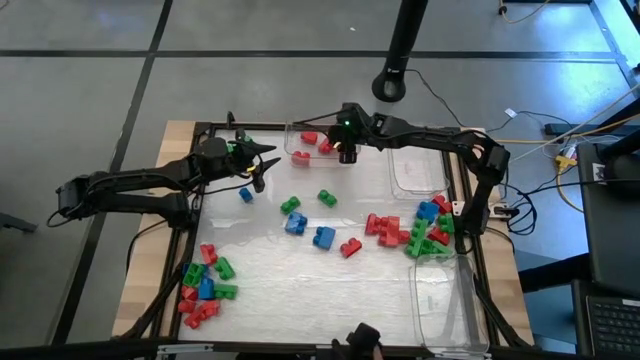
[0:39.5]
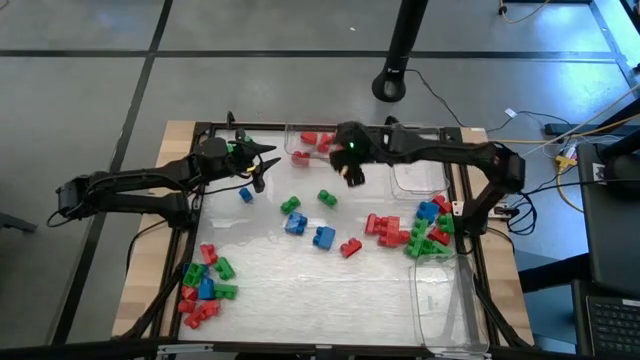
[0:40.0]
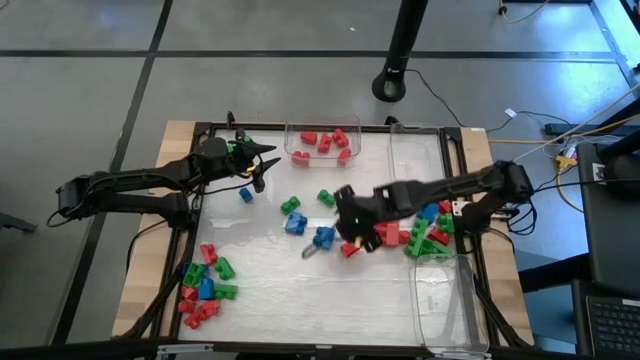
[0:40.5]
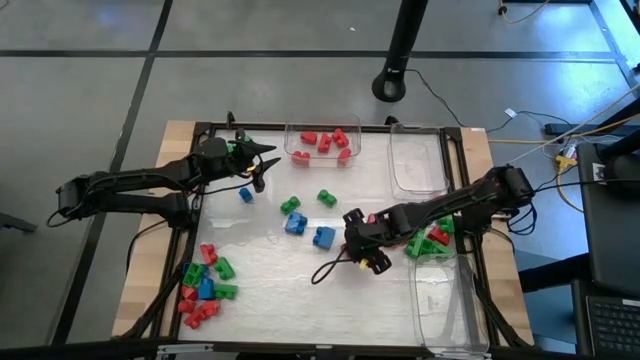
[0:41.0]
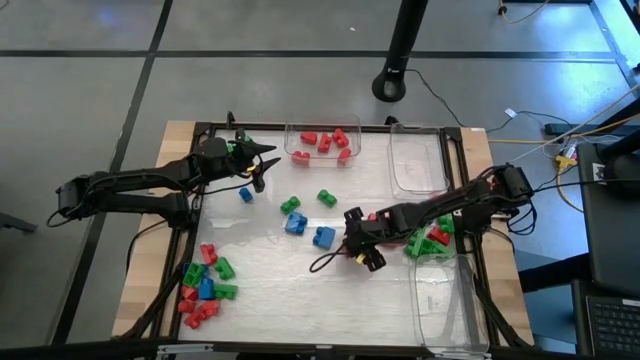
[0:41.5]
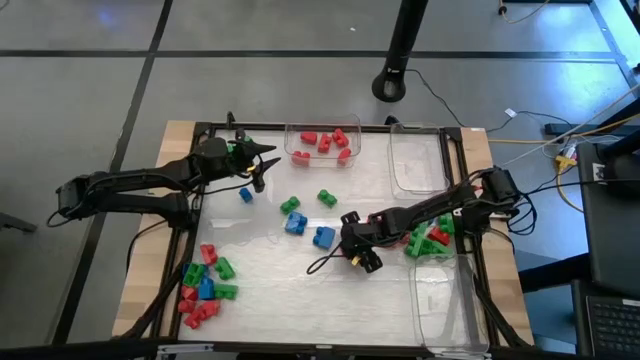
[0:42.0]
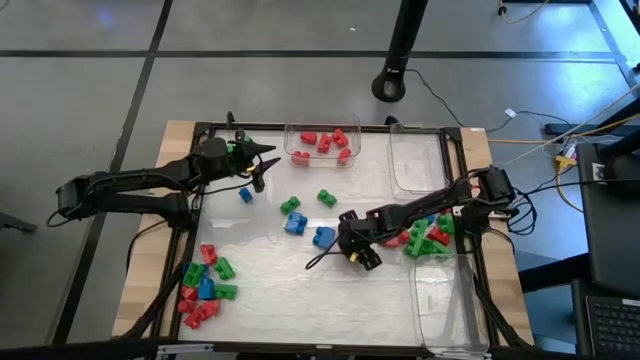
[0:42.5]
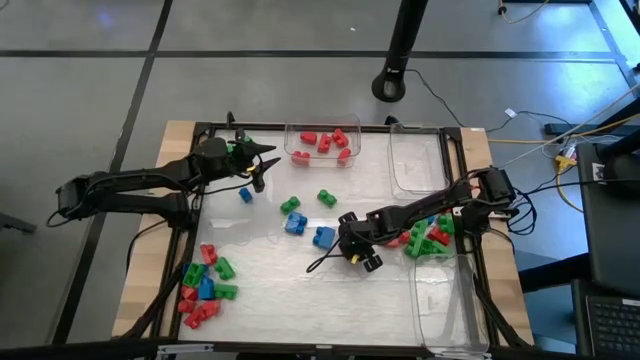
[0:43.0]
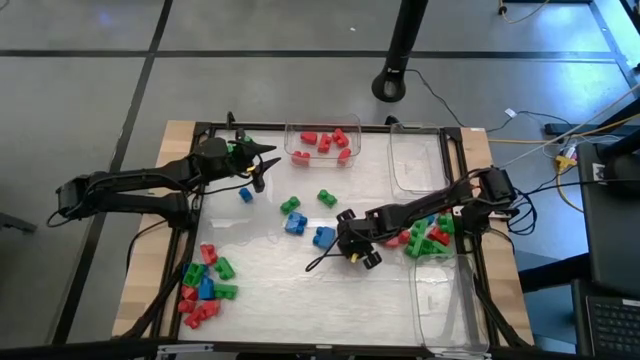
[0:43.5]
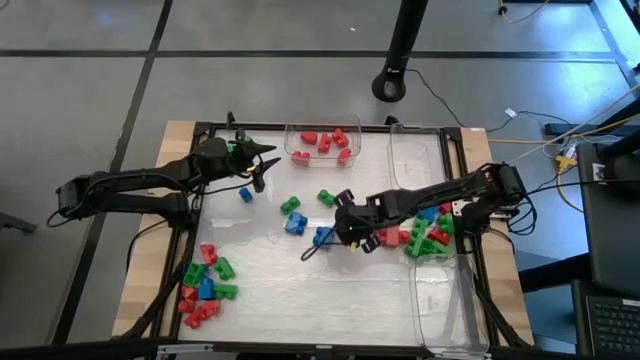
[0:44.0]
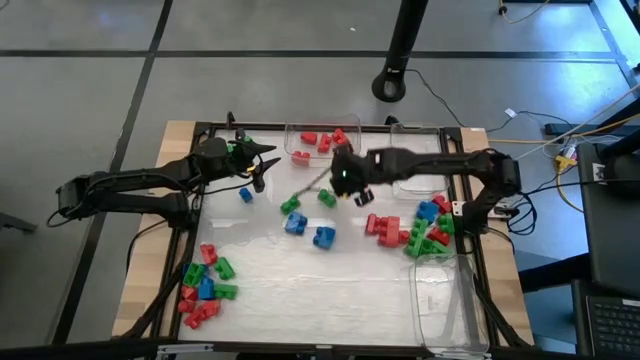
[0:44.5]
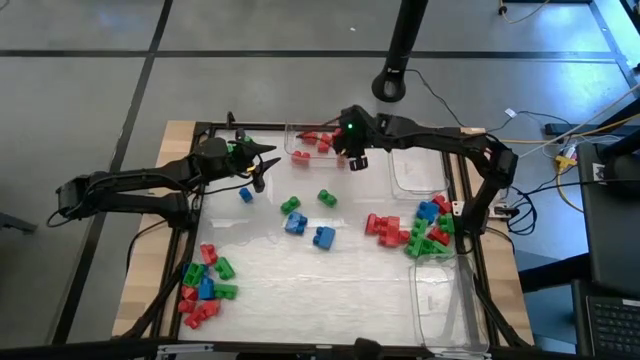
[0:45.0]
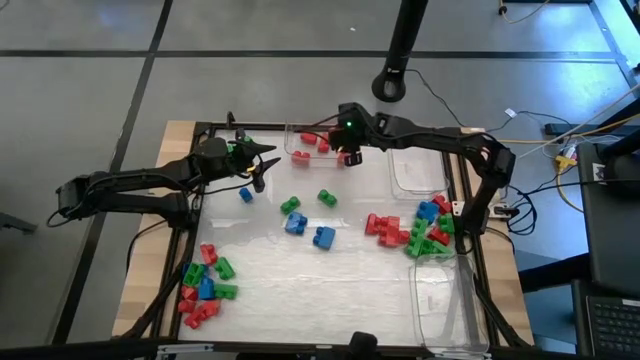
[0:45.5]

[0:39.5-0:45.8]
Task: Sort blocks
Put the red game piece into the top left transparent bin

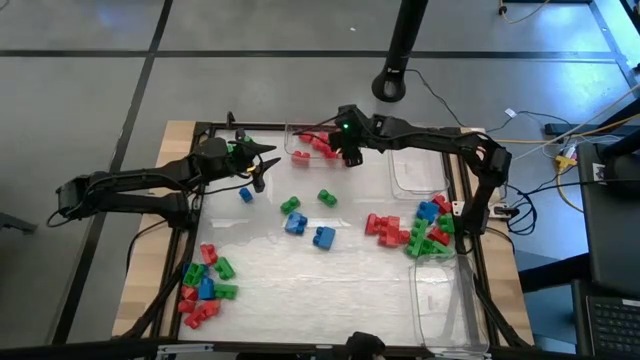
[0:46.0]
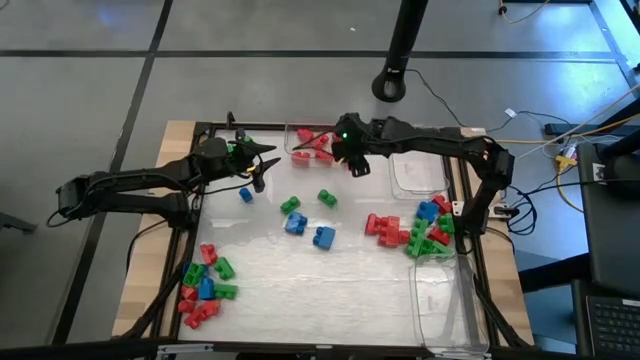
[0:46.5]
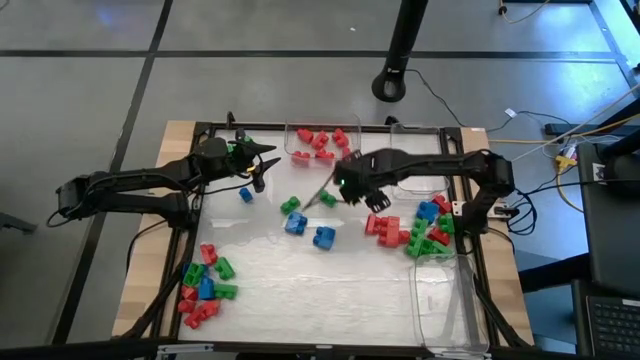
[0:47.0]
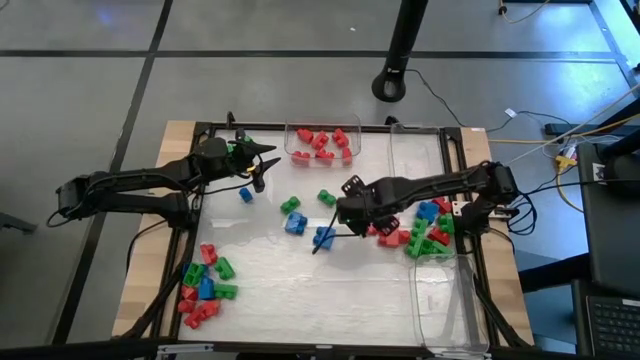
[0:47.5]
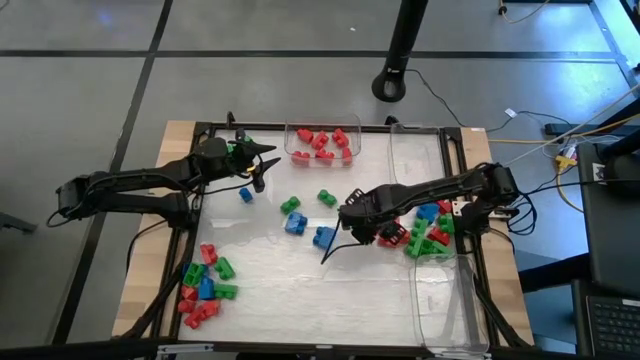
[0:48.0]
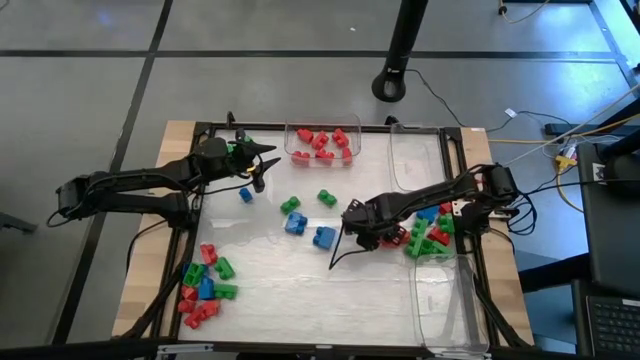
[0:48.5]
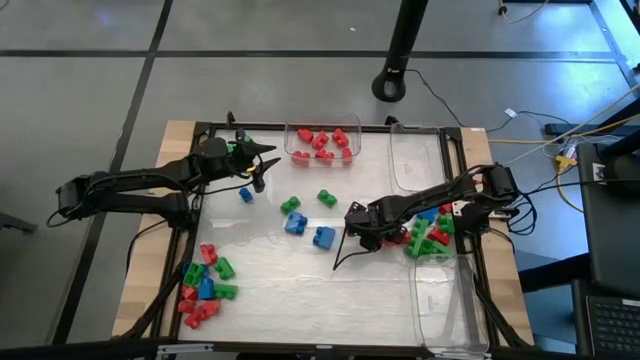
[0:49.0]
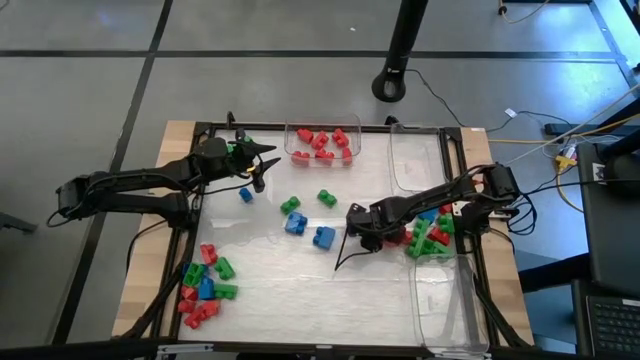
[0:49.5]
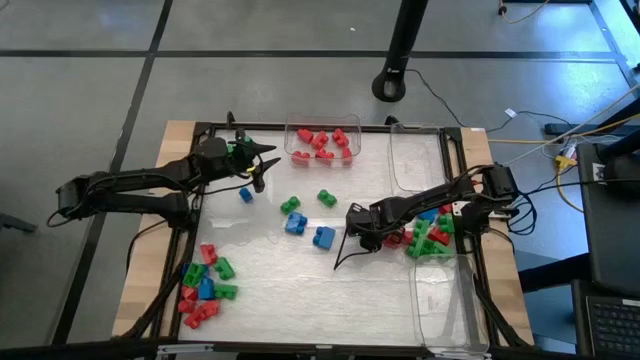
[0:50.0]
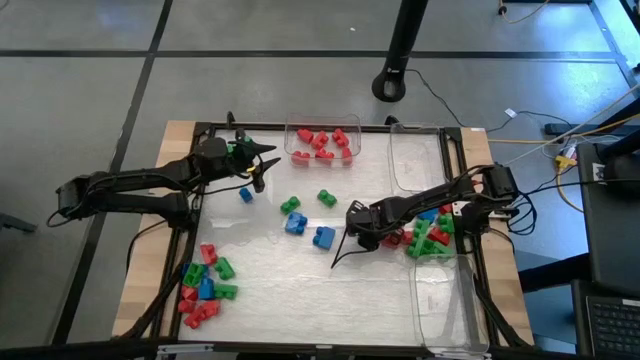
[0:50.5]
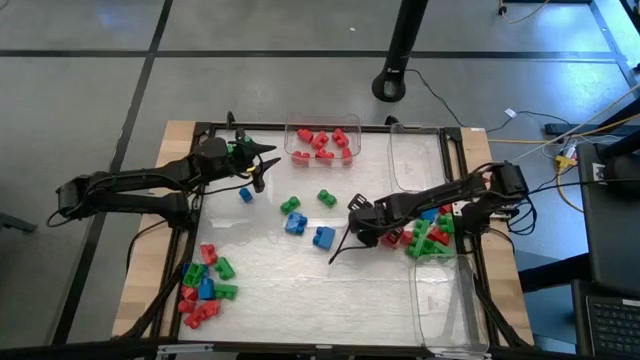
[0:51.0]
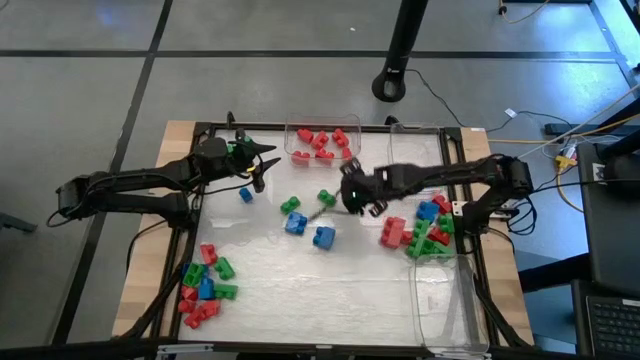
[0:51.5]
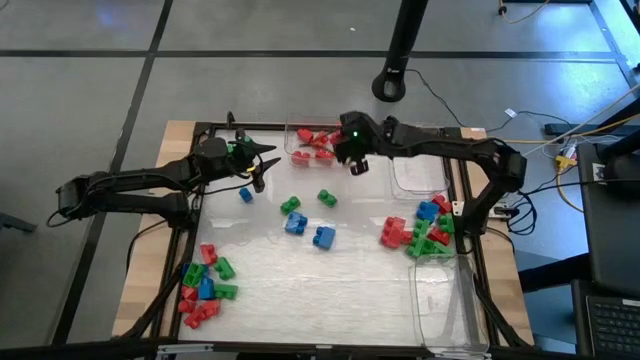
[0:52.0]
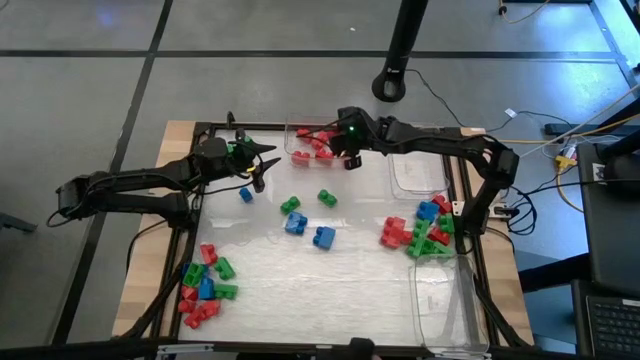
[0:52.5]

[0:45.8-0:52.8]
Put the red game piece into the top left transparent bin

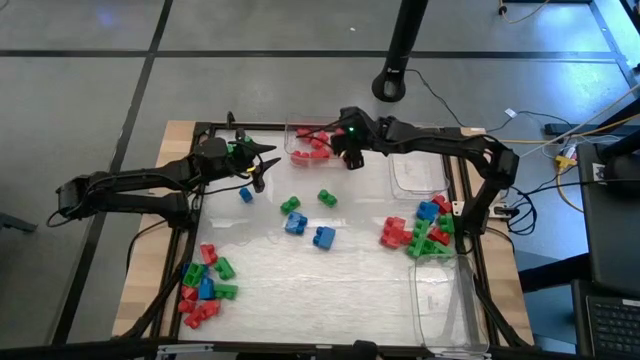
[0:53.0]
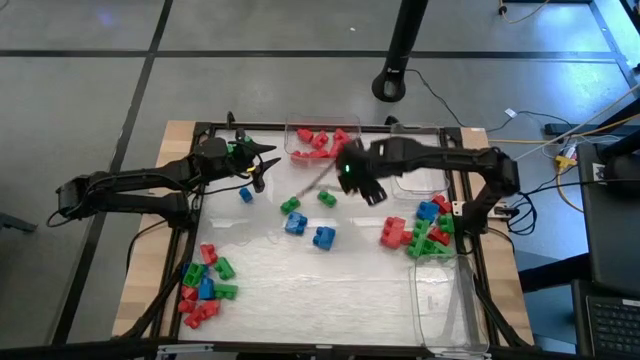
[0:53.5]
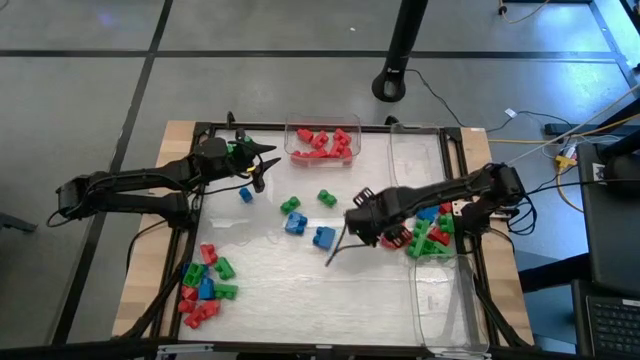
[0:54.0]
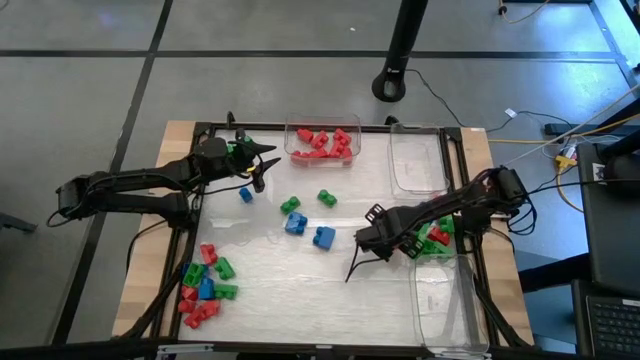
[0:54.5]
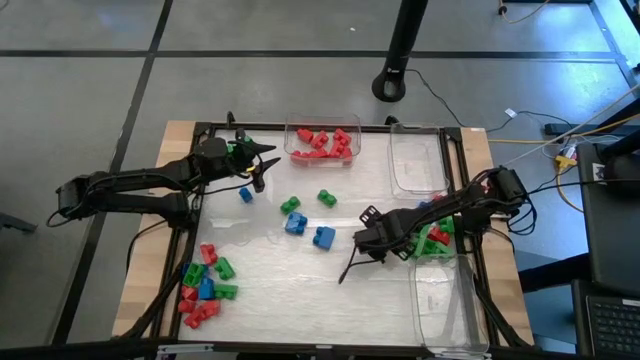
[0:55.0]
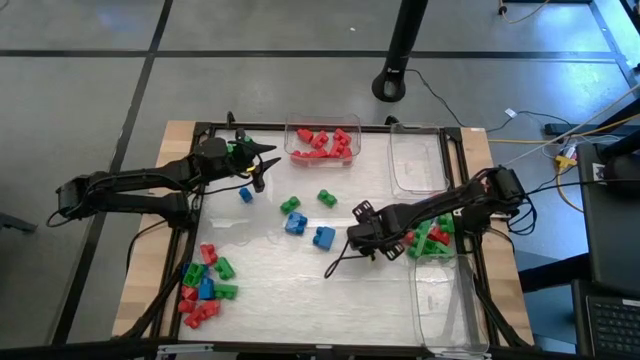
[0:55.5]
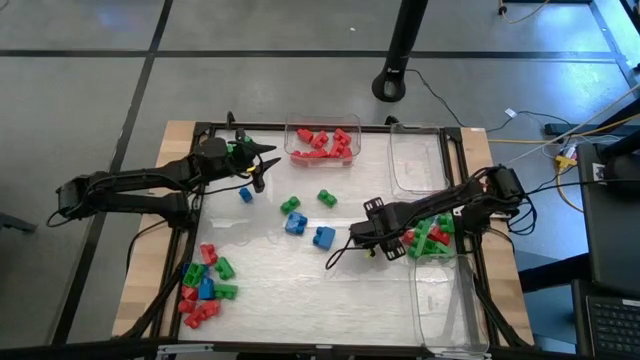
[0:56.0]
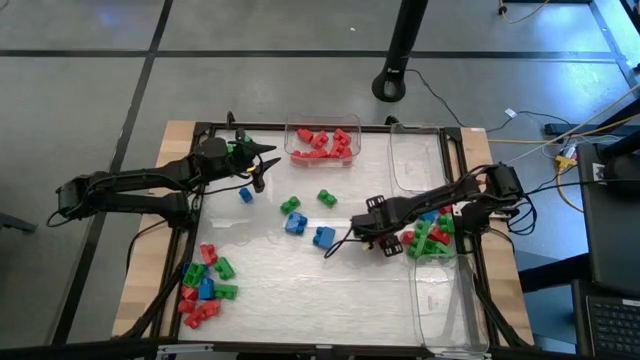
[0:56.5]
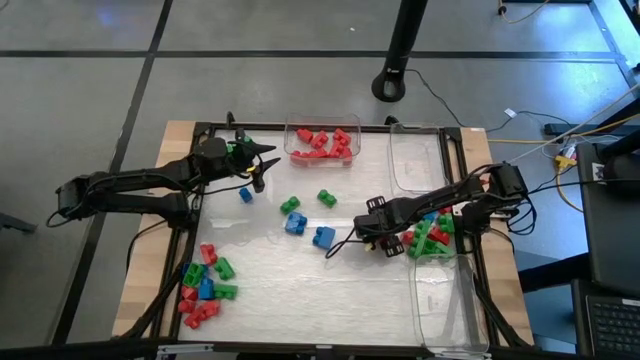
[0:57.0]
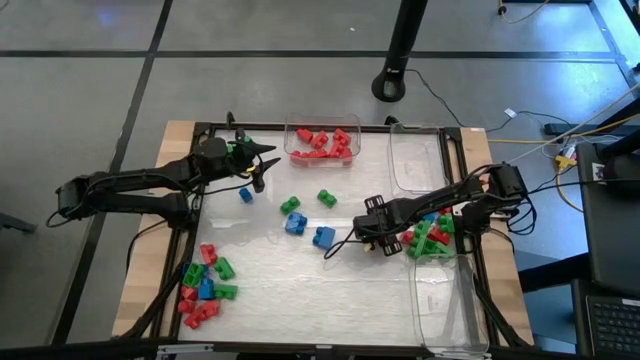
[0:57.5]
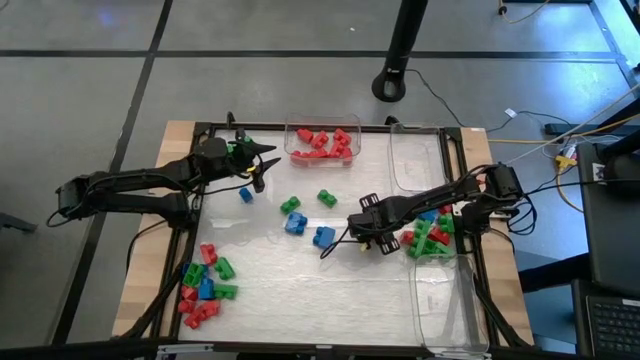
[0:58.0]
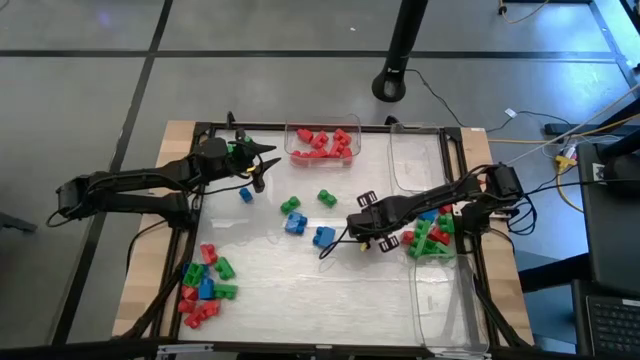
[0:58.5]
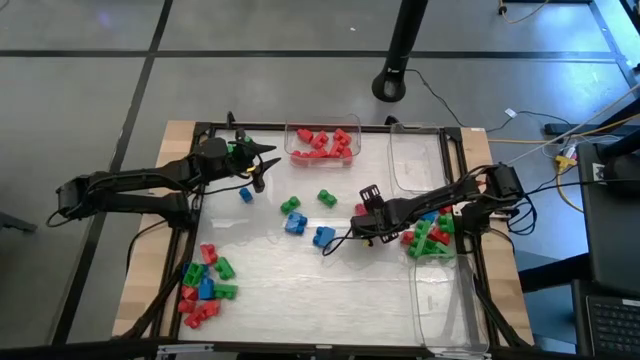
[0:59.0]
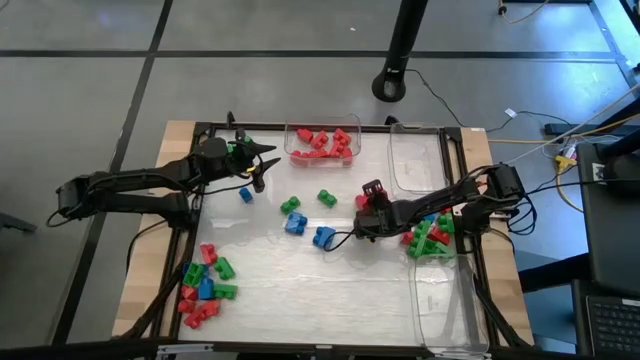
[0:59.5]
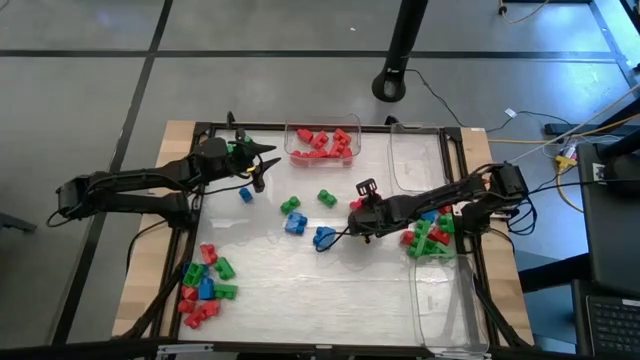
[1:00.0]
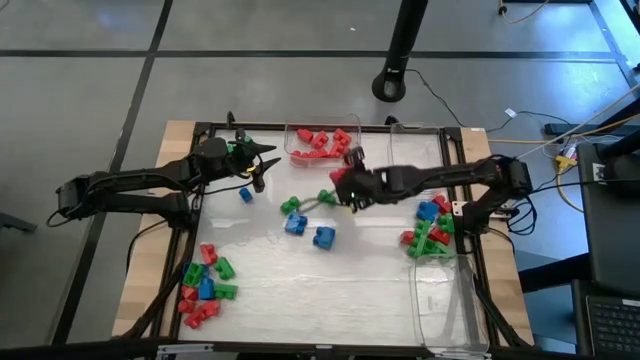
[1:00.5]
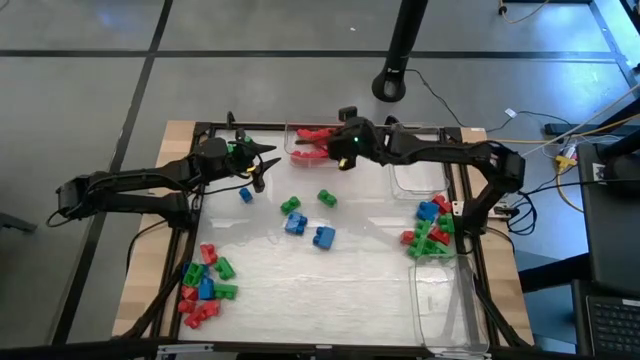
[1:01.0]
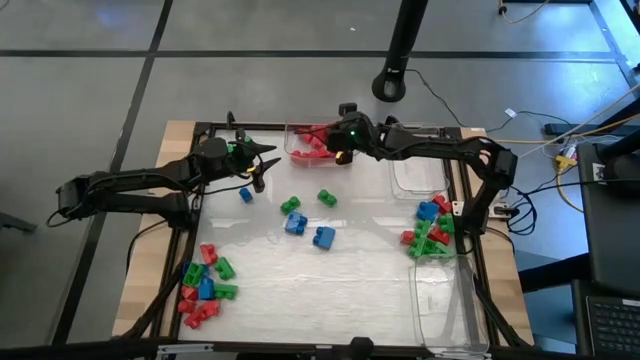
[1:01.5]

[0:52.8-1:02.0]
Put the red game piece into the top left transparent bin
